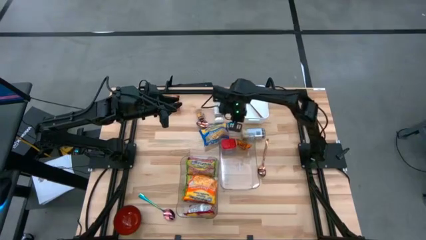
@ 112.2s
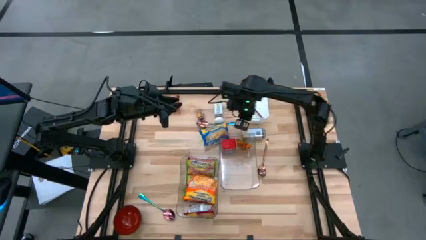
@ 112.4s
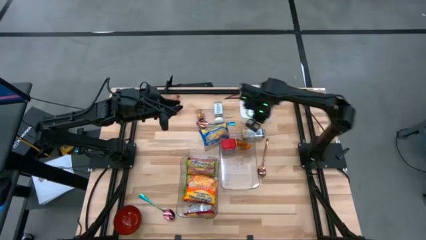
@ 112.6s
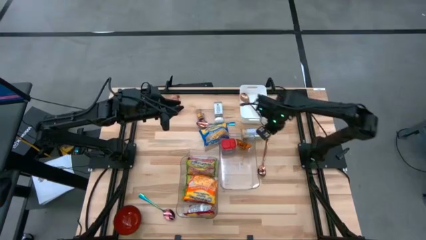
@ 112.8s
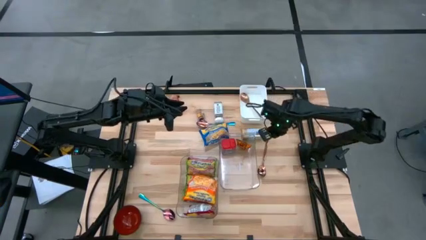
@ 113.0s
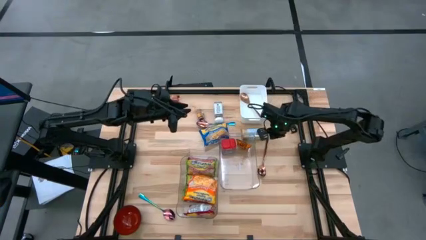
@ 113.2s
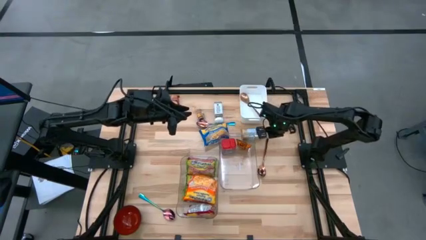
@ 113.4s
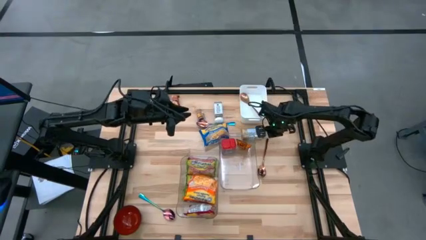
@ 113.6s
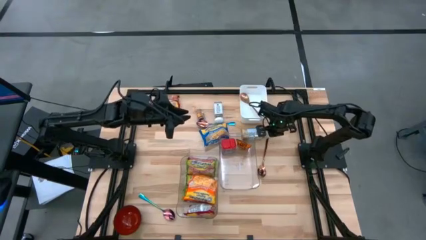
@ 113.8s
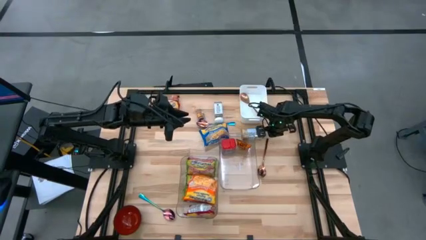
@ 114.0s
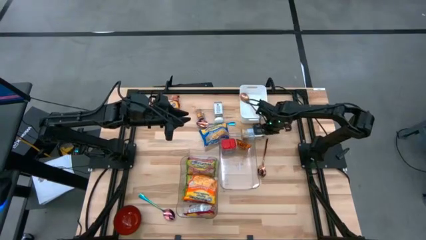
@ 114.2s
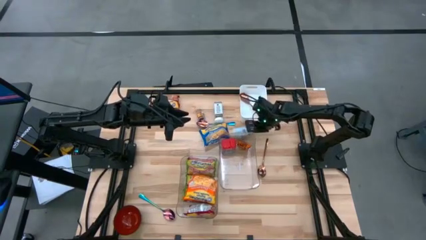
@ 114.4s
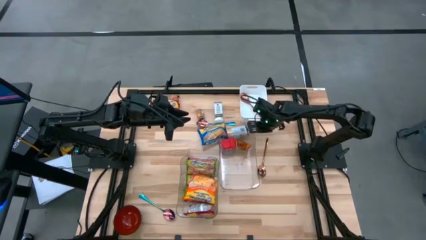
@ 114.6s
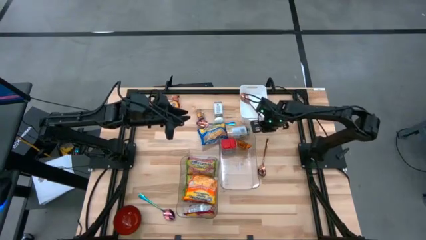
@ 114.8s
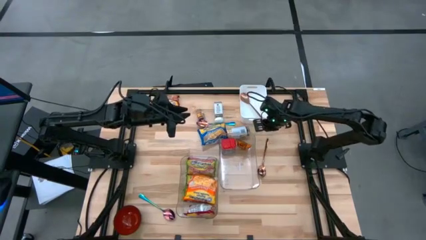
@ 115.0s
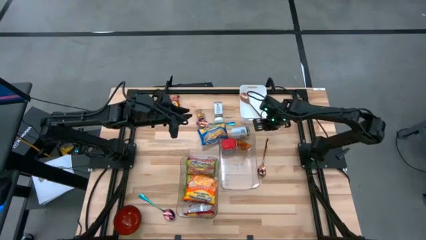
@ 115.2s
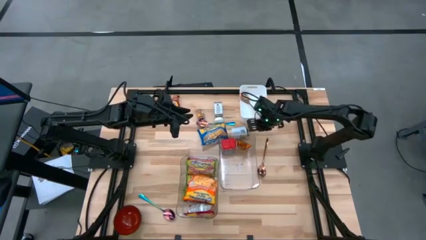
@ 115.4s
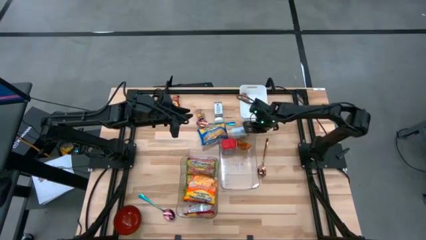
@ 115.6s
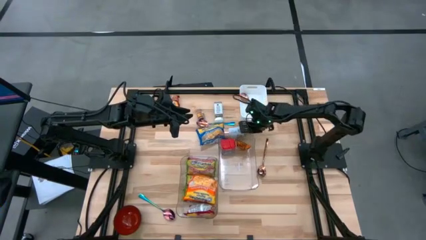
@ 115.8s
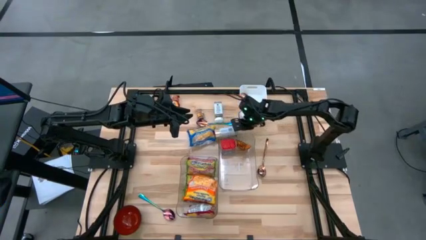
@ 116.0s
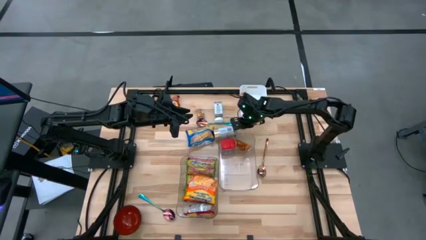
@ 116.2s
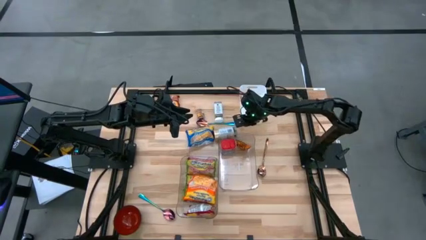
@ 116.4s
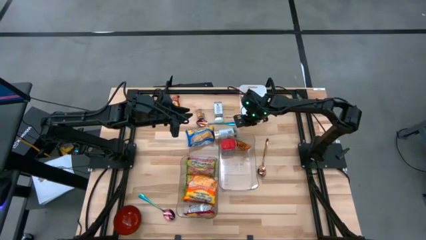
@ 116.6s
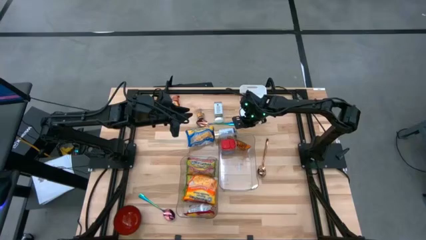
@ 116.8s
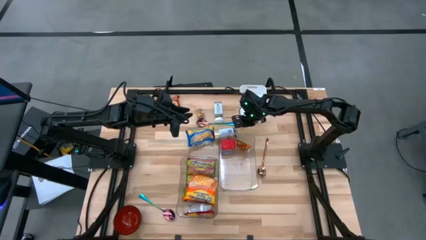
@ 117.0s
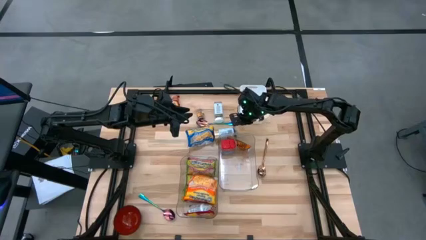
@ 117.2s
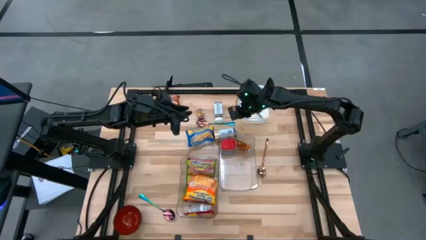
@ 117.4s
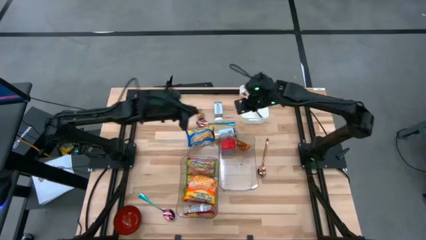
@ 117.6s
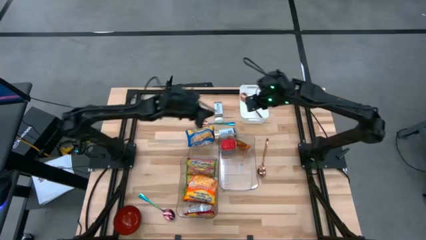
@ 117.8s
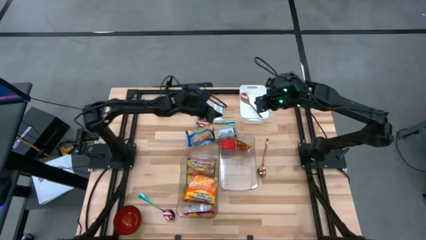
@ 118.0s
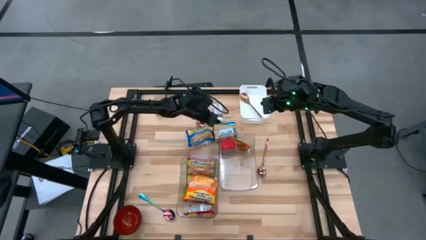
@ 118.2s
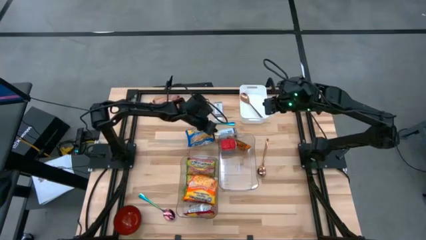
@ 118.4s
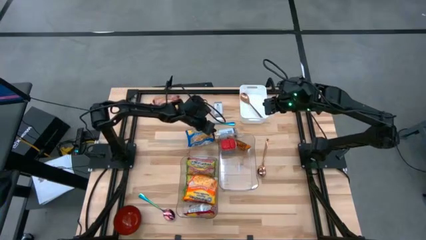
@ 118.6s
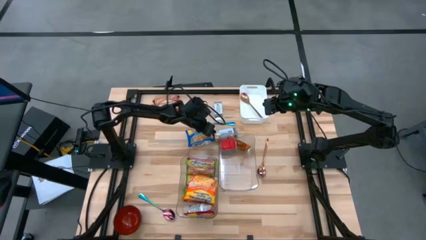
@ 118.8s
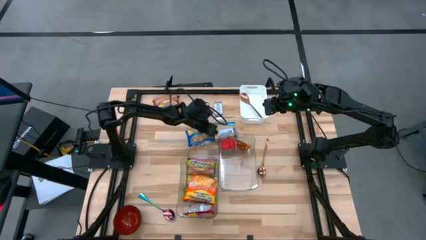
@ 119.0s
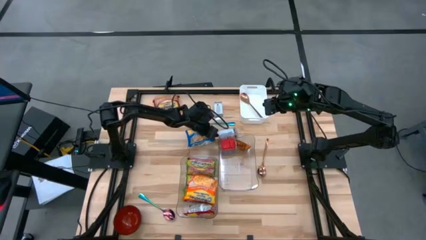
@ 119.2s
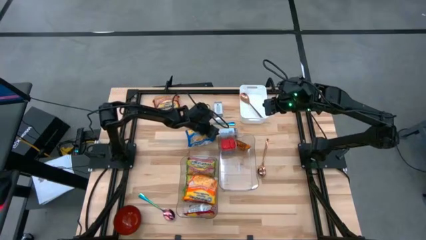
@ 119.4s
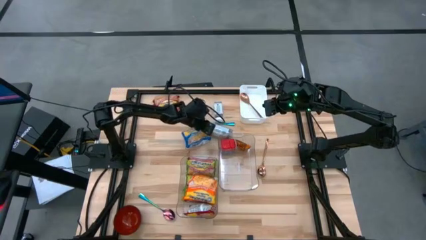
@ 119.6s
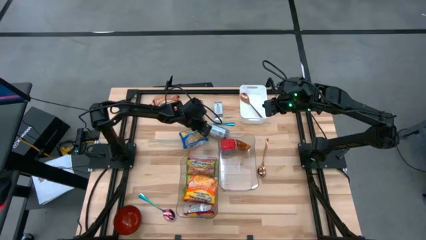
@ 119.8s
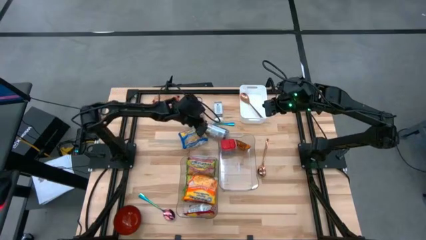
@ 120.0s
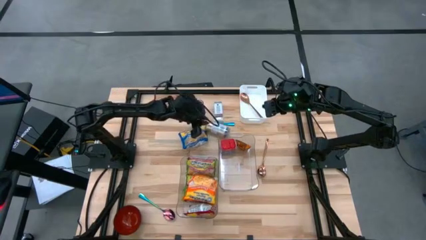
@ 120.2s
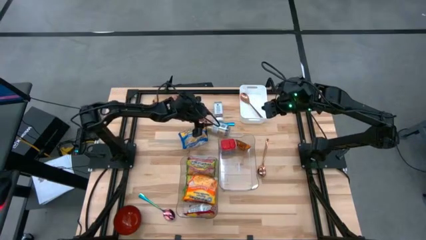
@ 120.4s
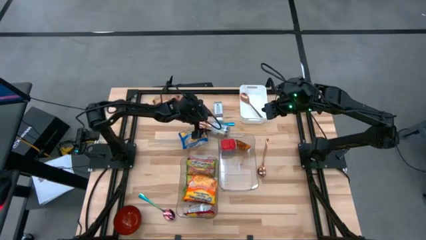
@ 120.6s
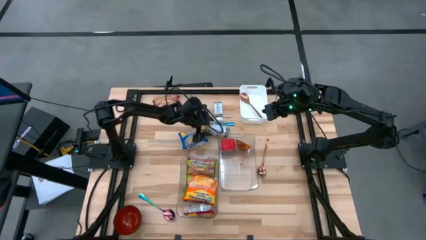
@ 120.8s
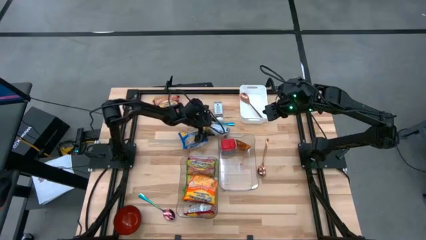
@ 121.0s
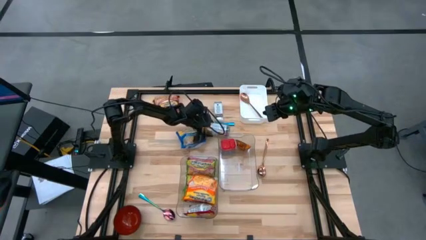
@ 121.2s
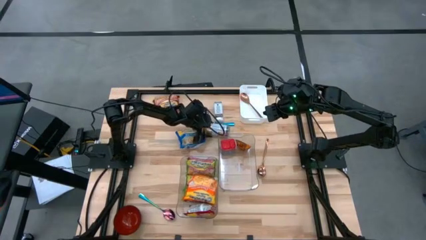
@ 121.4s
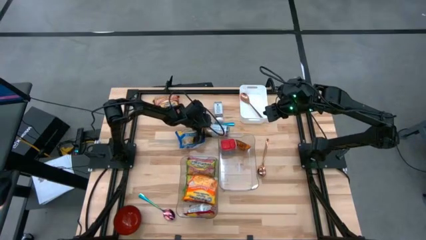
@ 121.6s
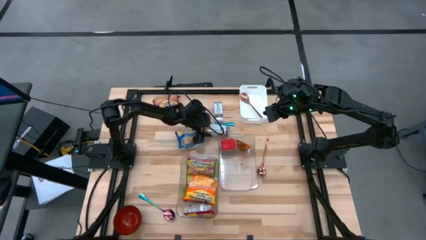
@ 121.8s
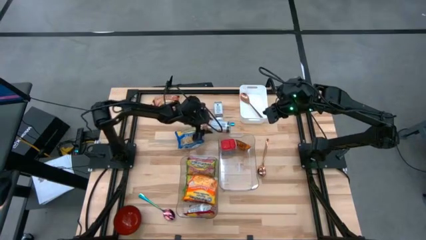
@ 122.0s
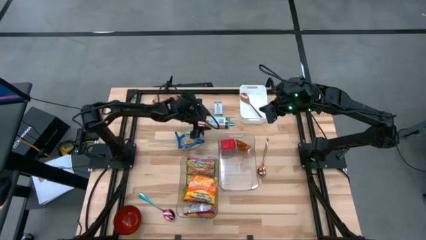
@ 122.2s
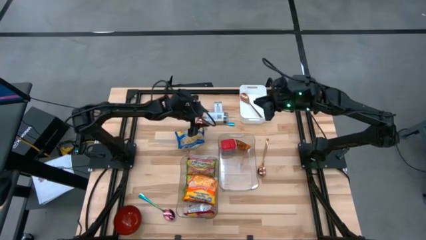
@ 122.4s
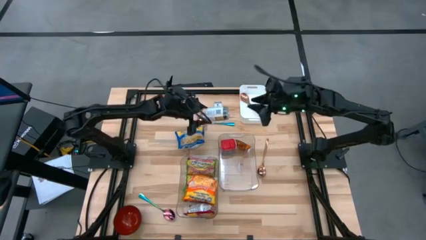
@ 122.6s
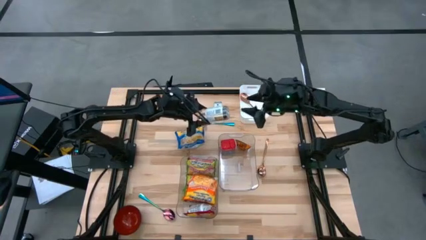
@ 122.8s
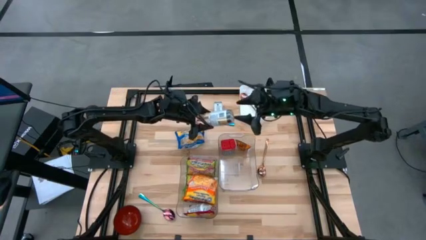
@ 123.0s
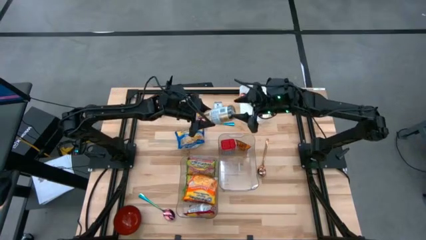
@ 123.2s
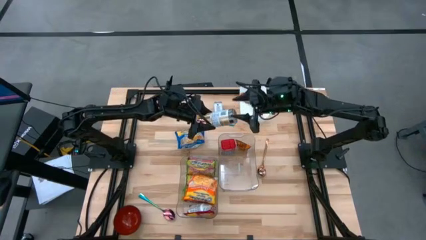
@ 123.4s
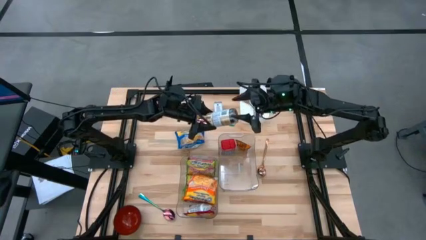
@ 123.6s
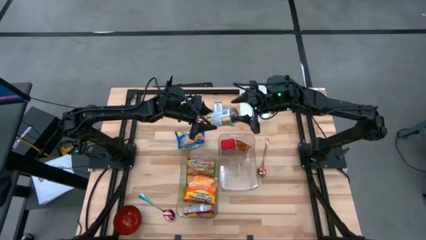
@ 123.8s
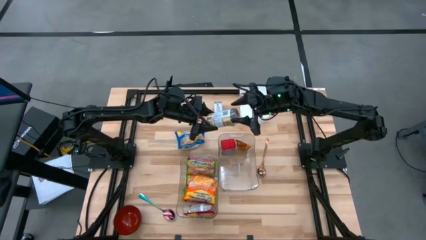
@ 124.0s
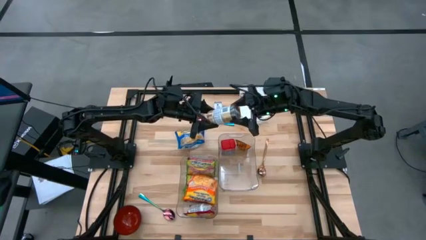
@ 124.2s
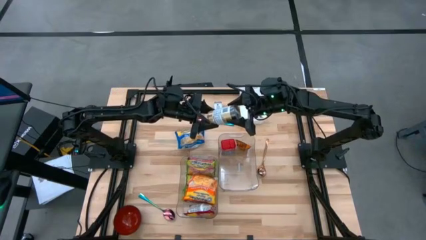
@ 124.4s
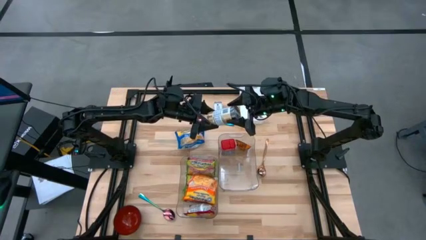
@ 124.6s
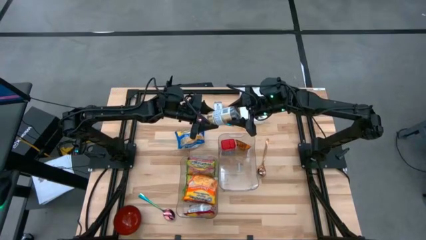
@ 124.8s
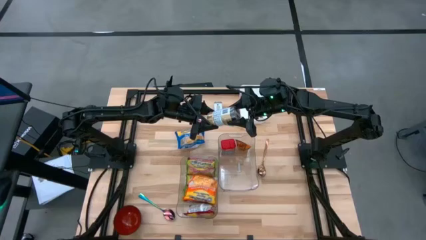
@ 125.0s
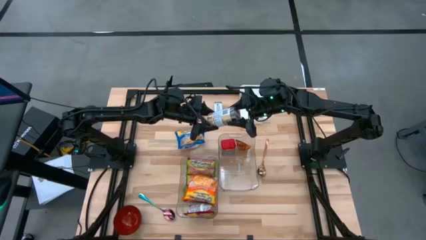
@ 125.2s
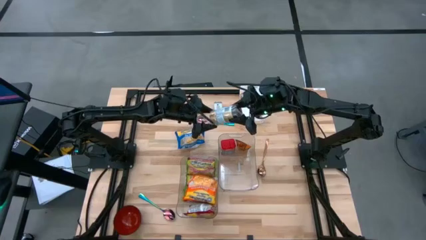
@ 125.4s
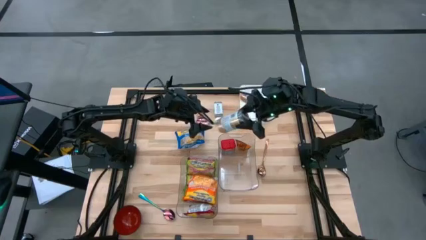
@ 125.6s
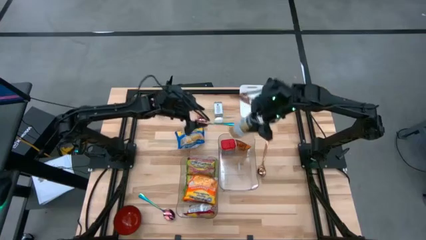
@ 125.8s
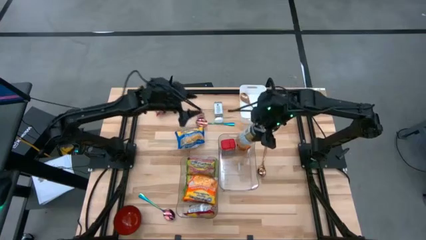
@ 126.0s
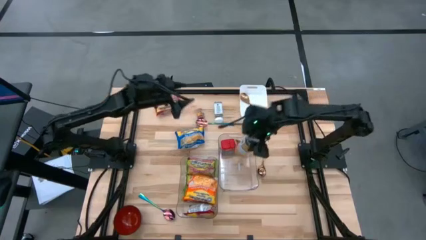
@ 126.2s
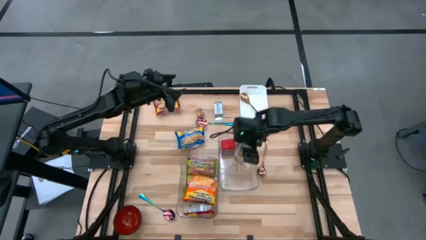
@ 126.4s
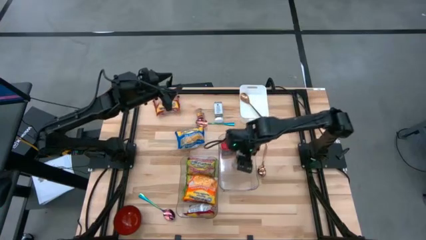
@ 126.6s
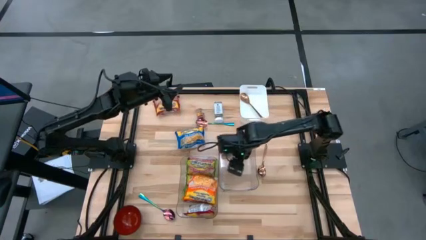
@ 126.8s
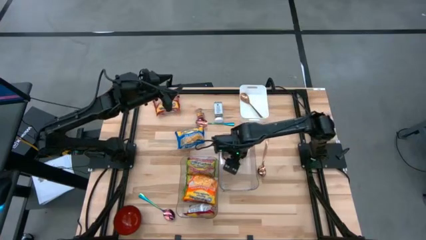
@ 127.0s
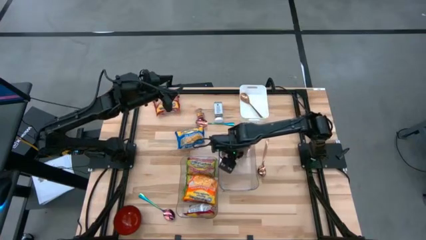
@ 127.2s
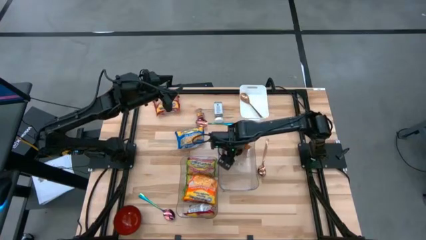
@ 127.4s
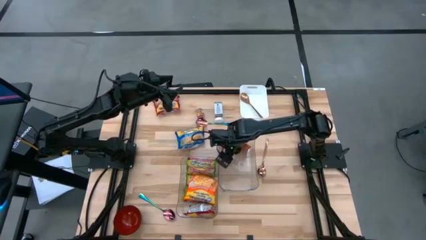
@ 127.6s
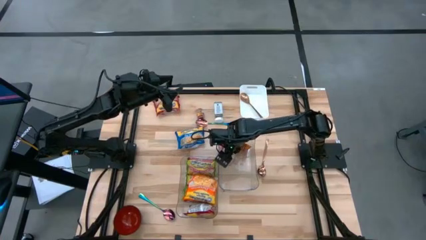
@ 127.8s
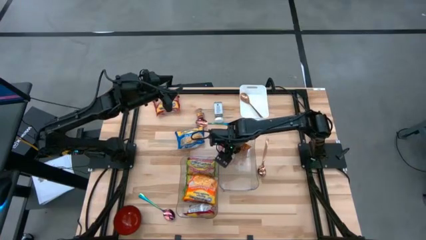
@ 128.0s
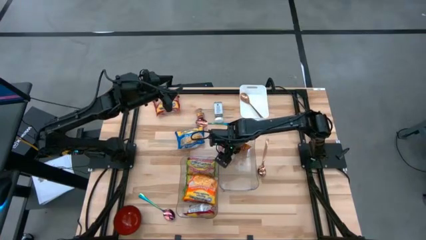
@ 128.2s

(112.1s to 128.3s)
Task: Pick & Place Food Item
Put the gold seasoning bottle into the right transparent bin
